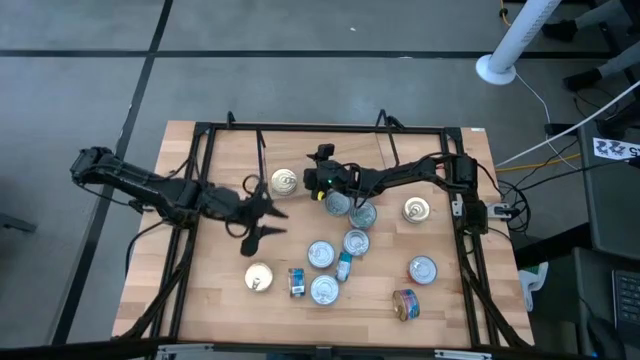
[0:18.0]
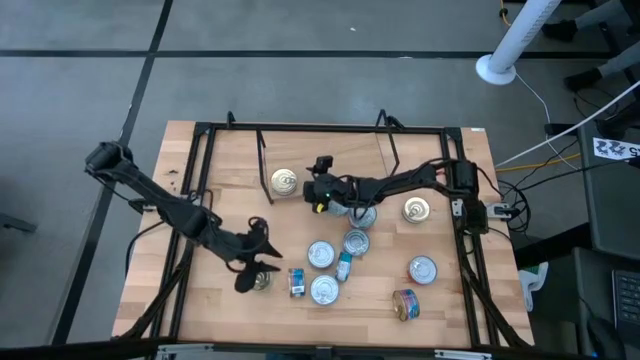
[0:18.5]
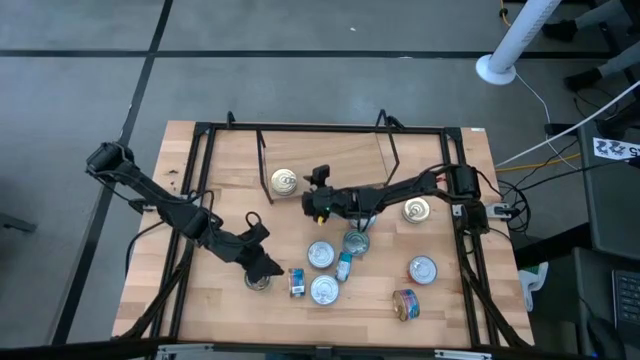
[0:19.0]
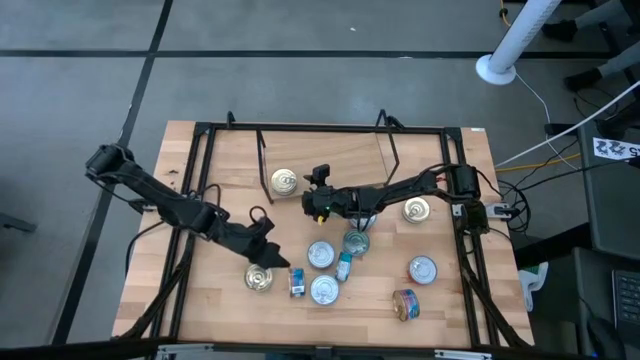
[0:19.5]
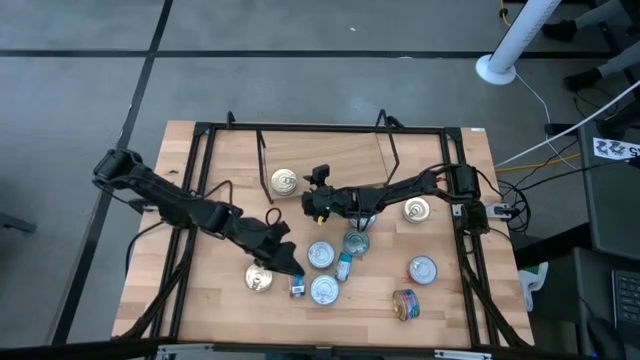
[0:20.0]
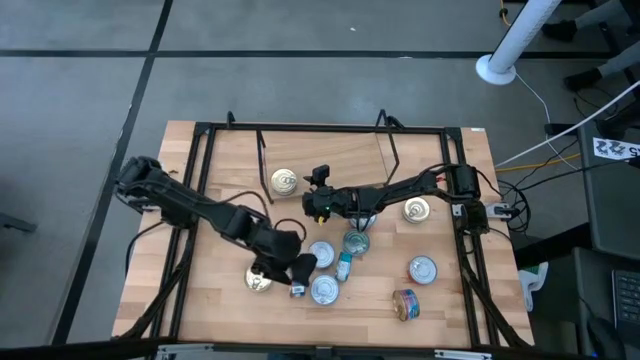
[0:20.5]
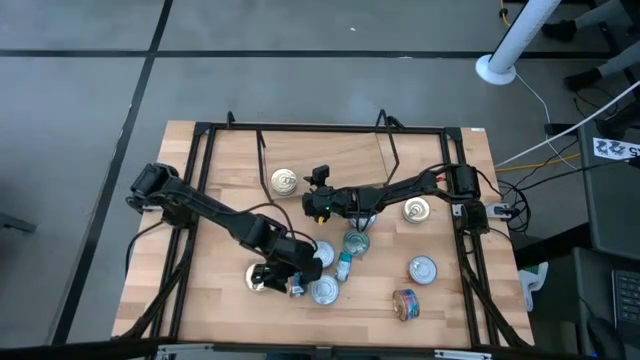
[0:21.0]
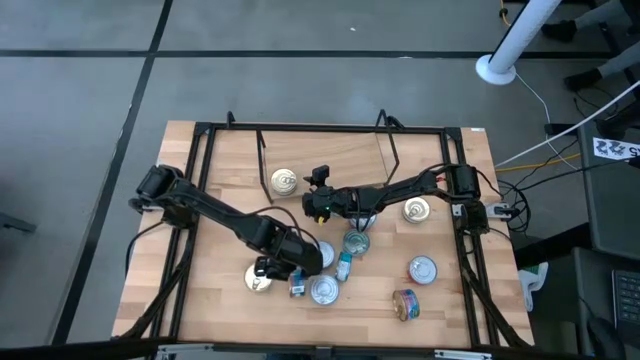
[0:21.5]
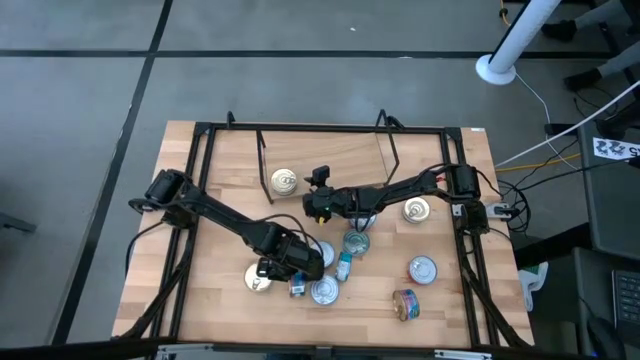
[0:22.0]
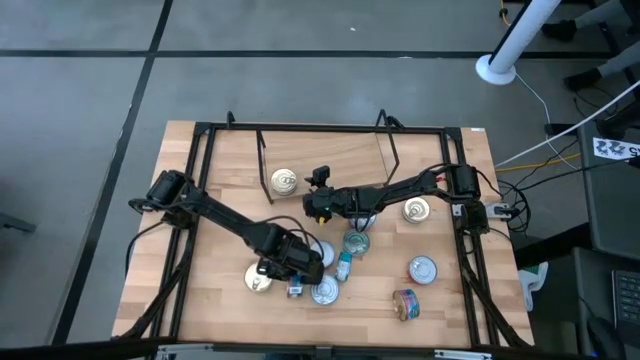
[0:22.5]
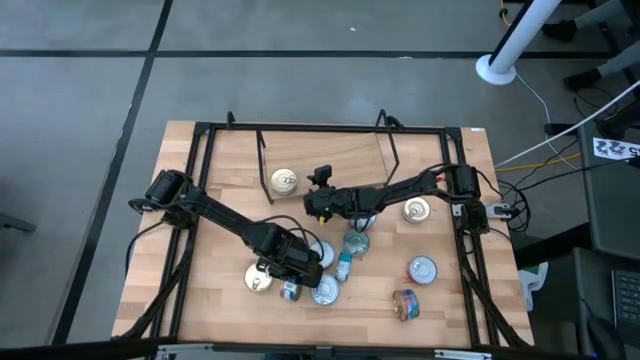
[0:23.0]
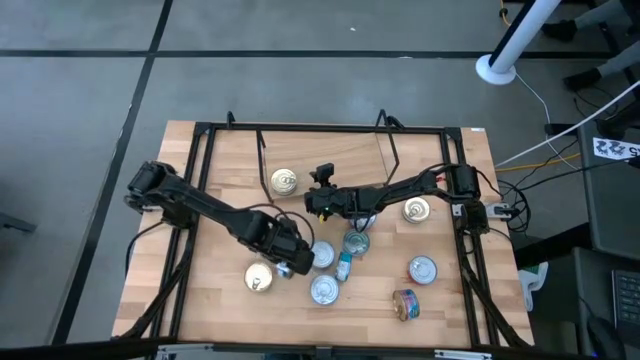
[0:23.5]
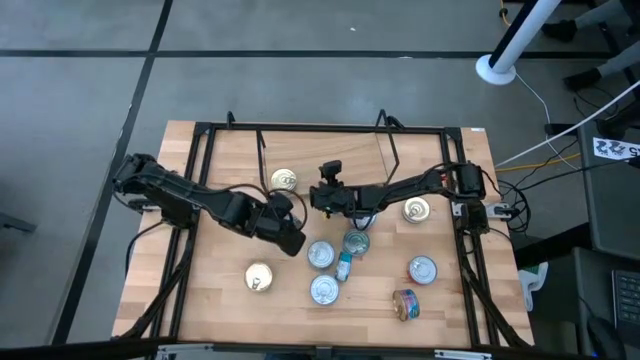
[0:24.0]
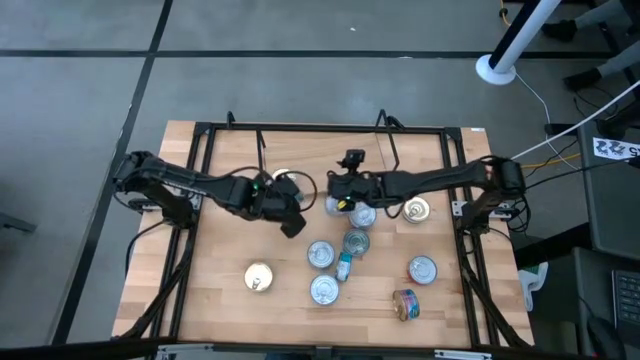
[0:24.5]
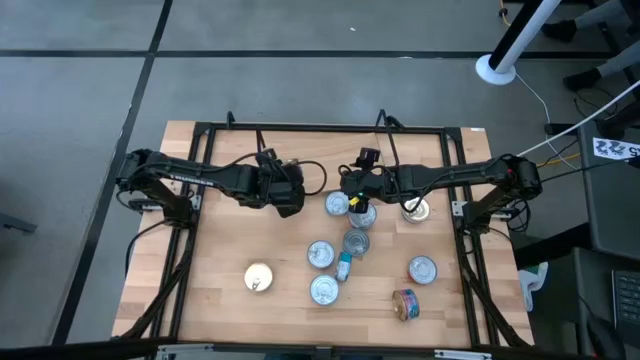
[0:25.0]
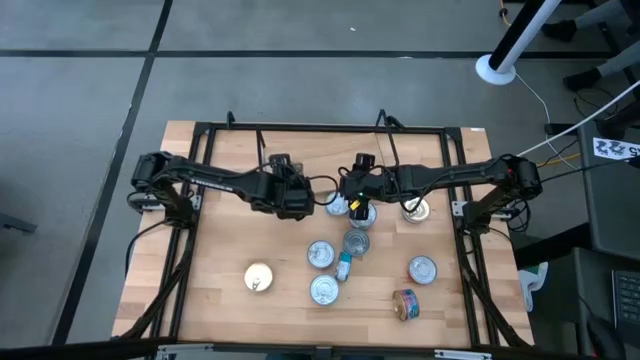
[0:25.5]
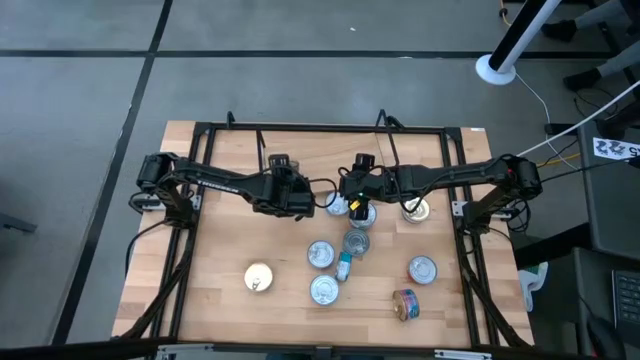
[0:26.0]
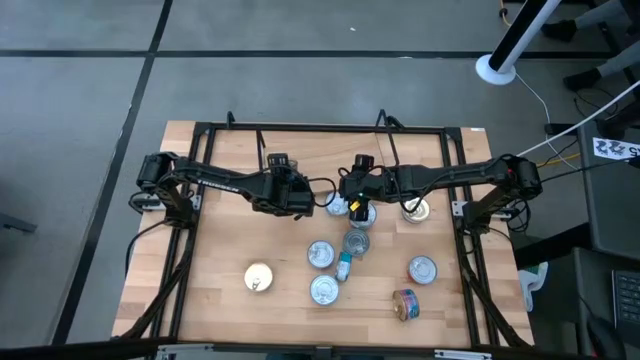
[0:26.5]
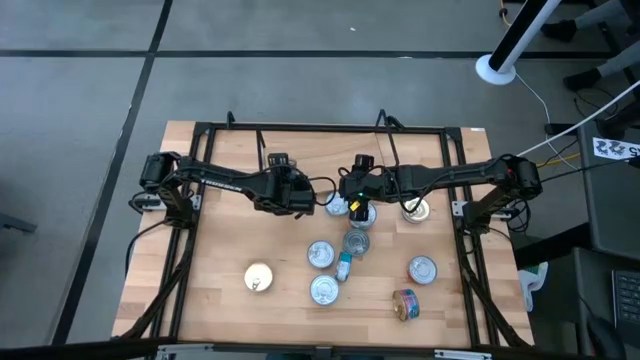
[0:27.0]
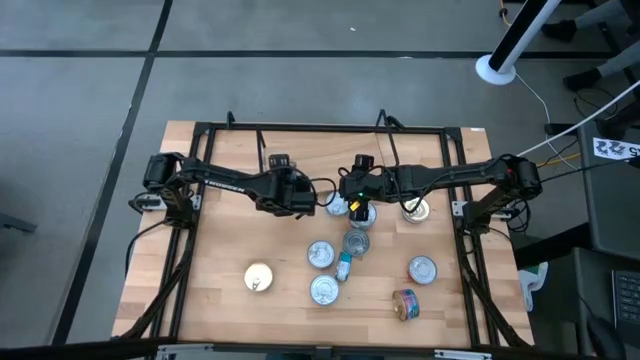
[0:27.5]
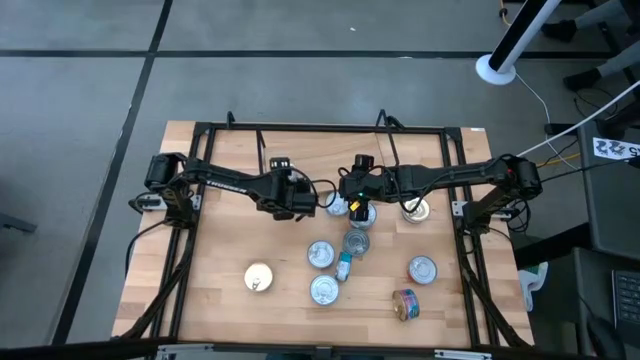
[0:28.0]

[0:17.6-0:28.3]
Task: Stack canned seafood by type on shelf
Stack the blue pink tuna can on top of the other blue tuna can on the shelf

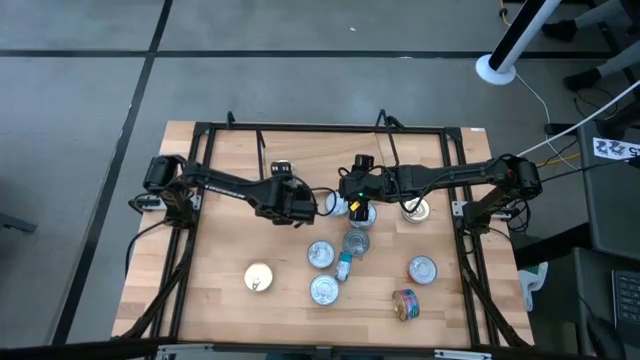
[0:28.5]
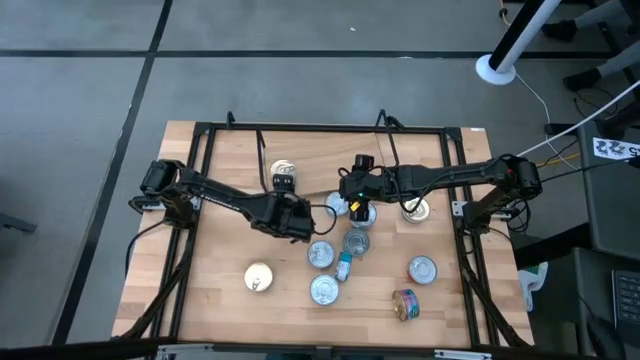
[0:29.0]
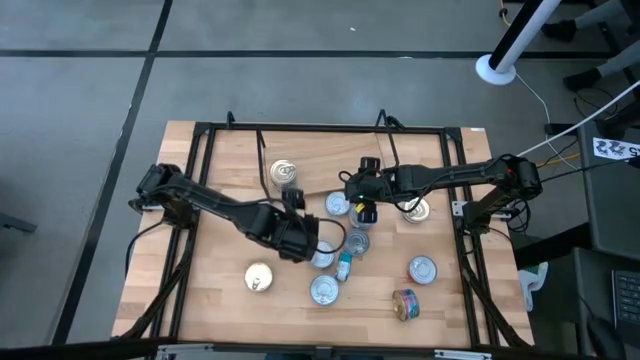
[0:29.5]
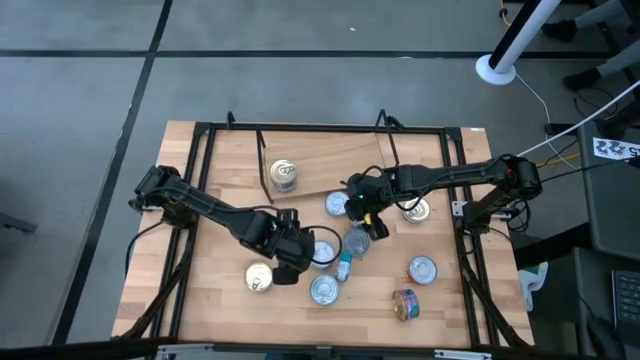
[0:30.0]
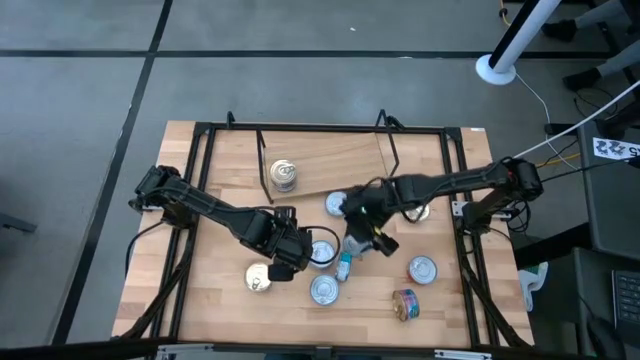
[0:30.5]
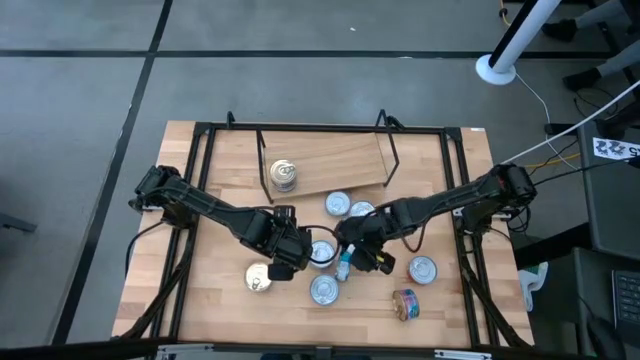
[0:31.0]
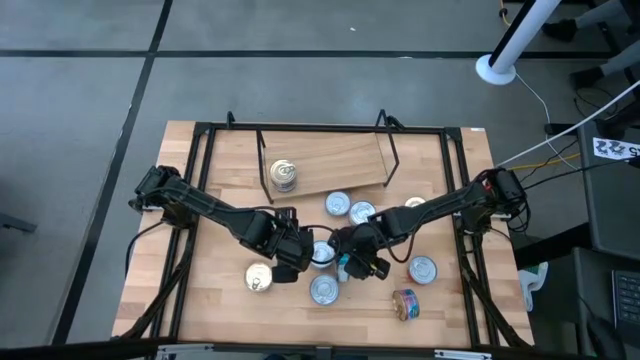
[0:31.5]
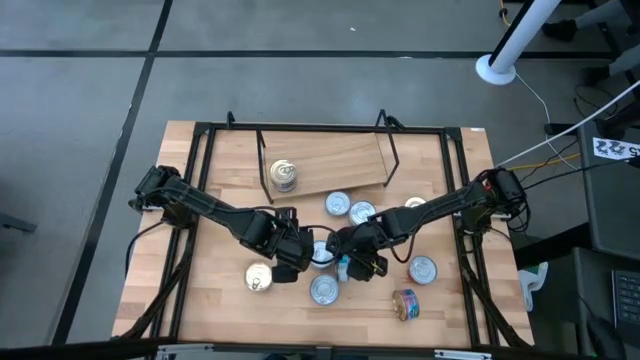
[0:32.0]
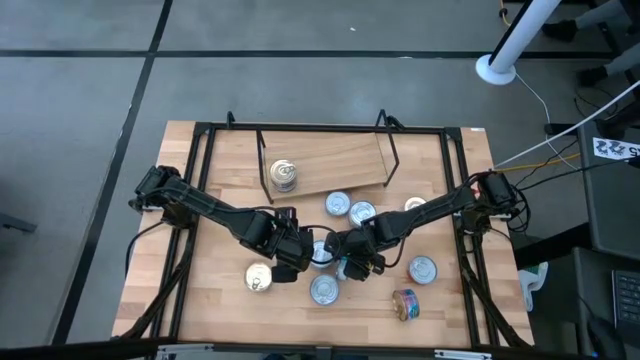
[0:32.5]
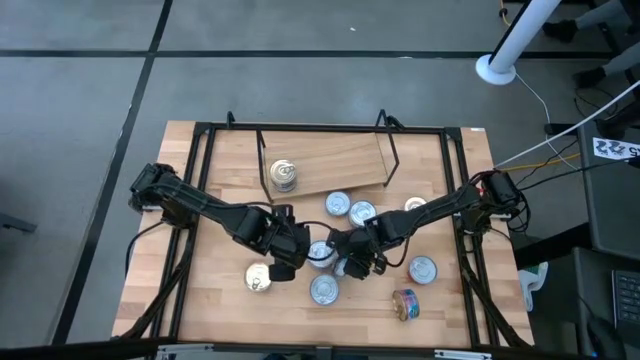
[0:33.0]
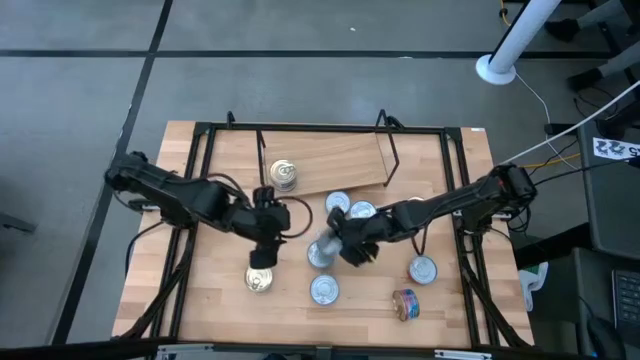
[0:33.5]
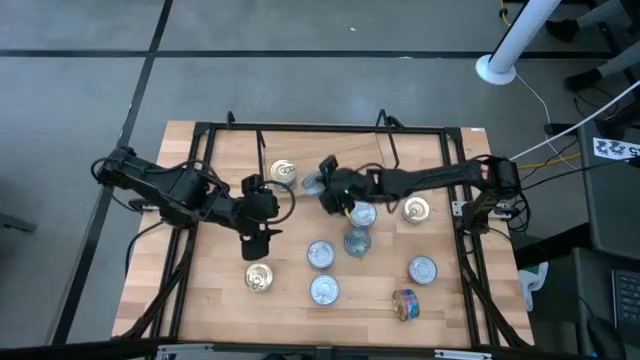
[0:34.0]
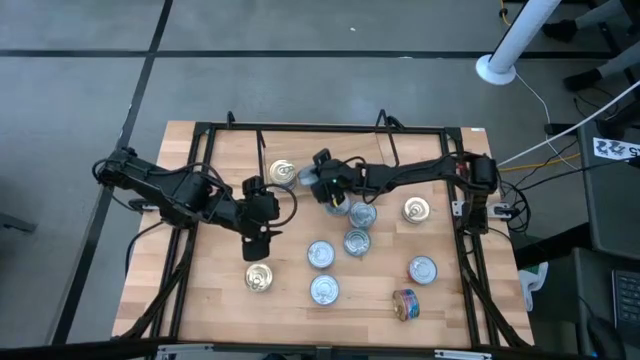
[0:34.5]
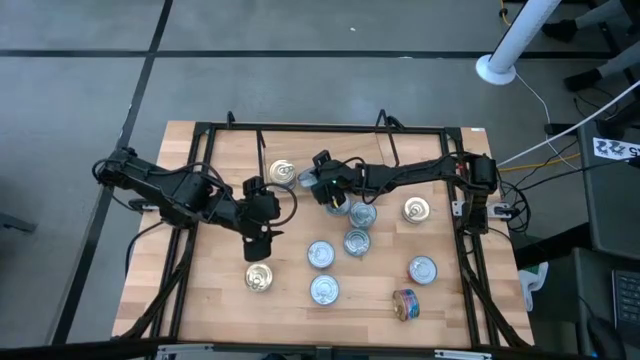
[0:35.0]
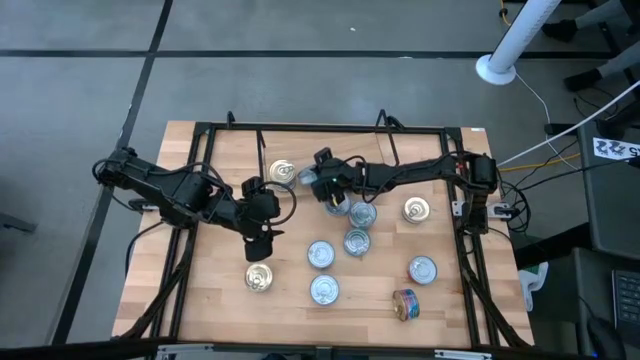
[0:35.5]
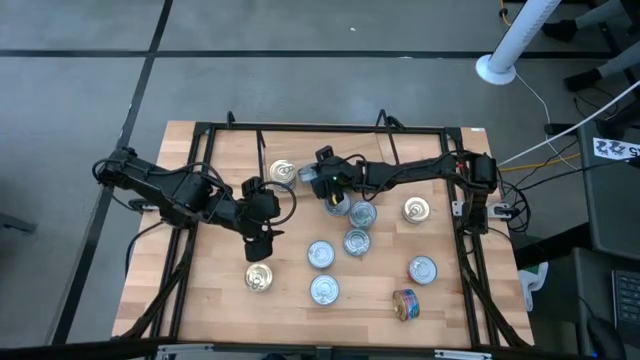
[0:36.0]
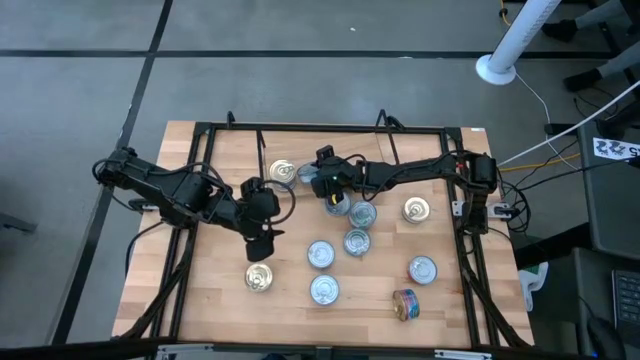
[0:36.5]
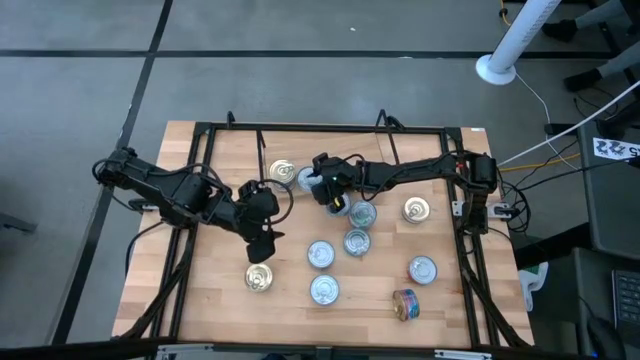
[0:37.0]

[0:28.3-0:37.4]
Put the yellow blue tuna can on the shelf

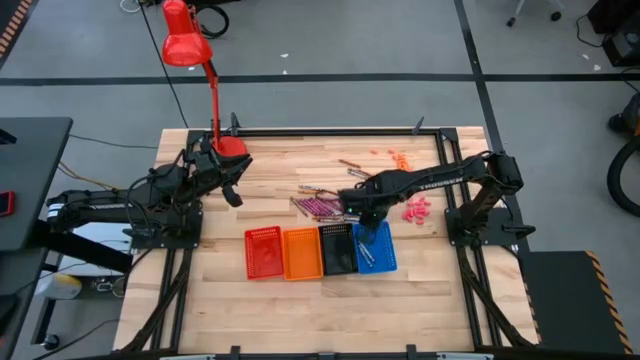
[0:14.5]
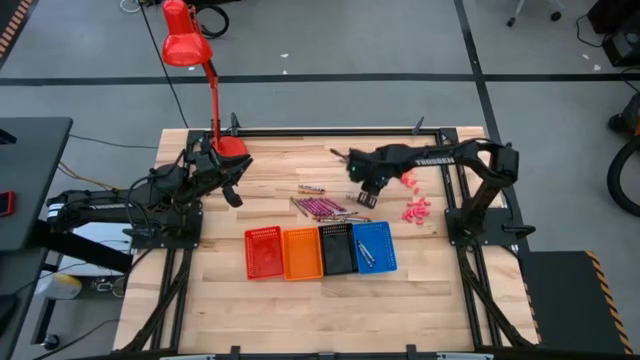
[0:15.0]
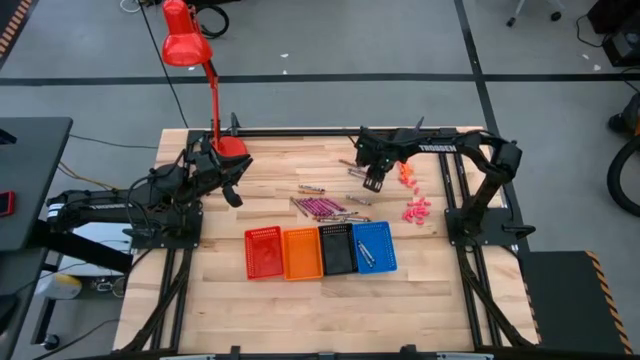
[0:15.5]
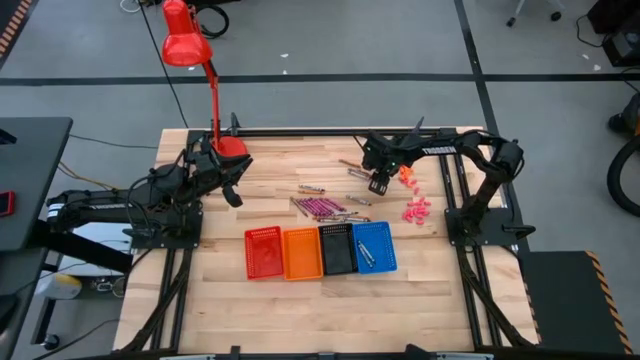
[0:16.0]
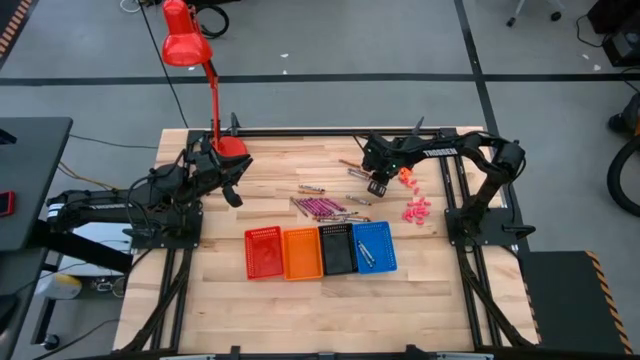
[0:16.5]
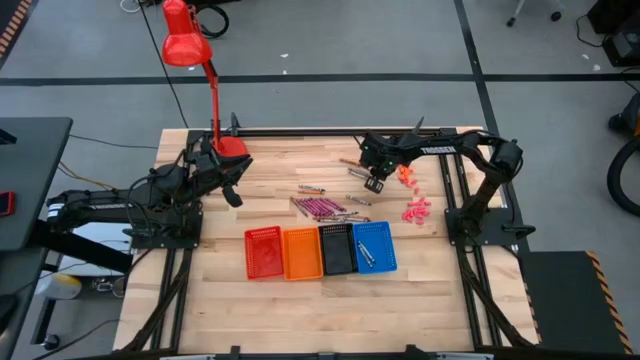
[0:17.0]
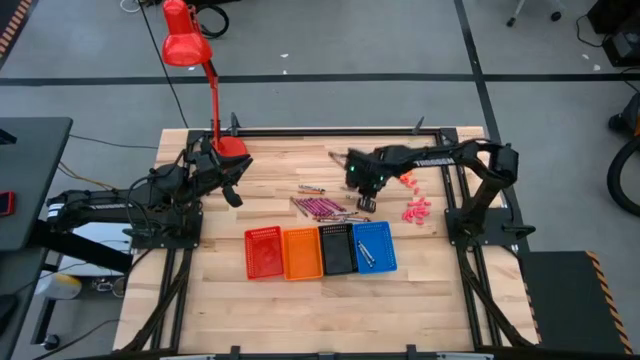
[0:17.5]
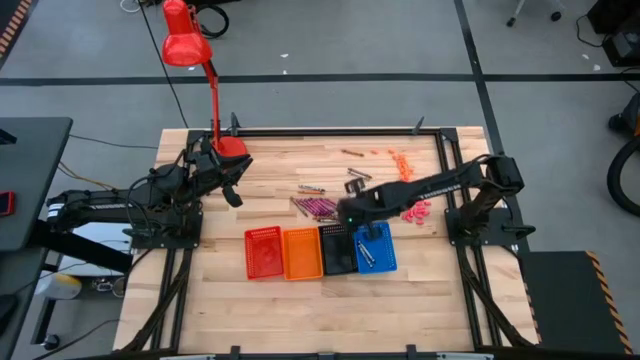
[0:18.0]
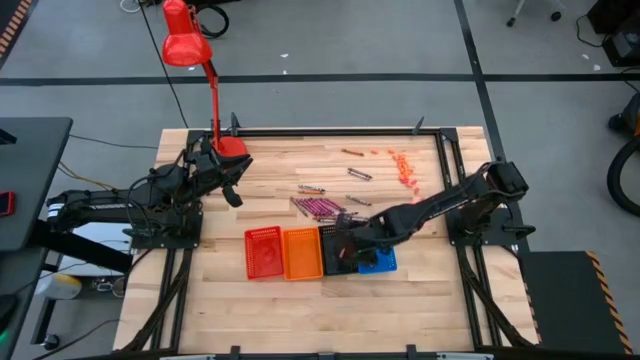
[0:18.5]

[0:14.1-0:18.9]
Task: Sort crayons
Put the orange crayon into the black bin
